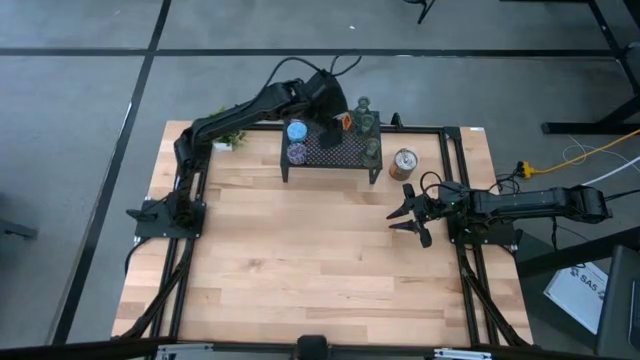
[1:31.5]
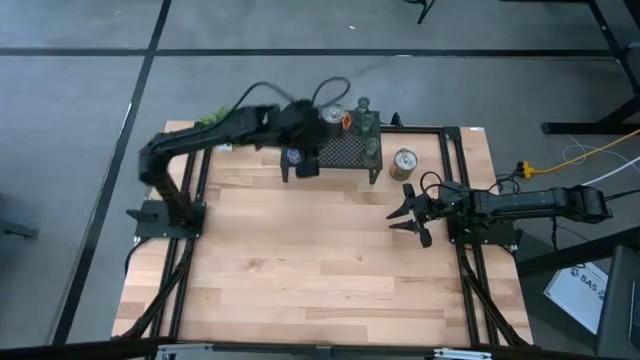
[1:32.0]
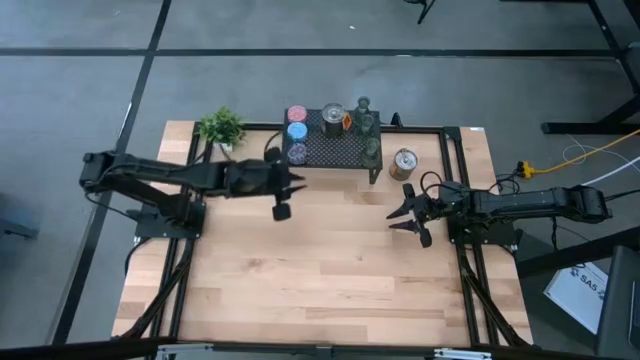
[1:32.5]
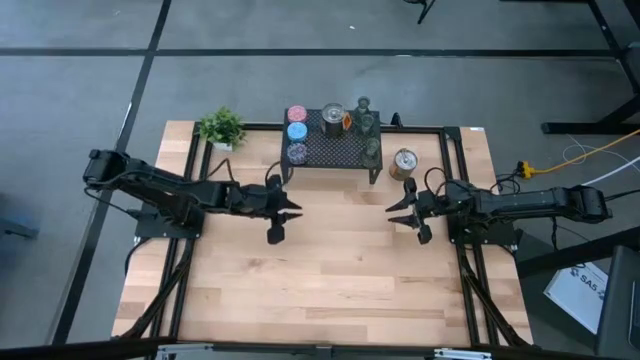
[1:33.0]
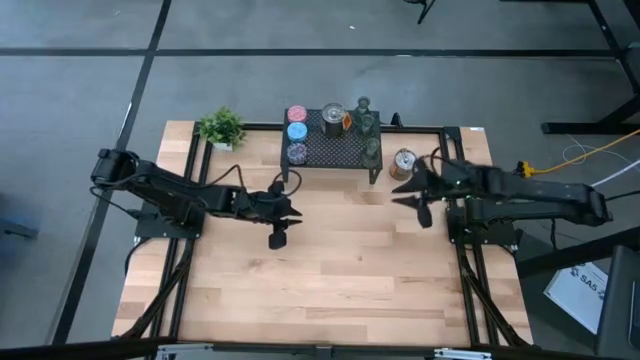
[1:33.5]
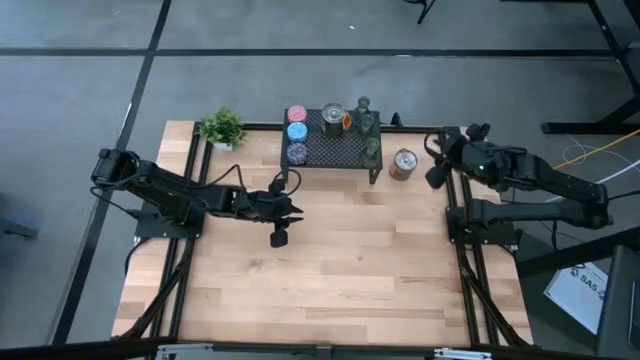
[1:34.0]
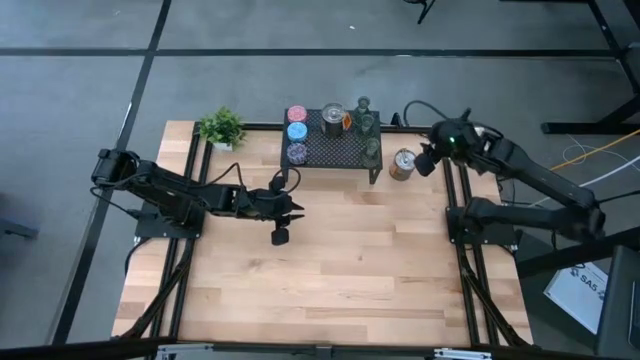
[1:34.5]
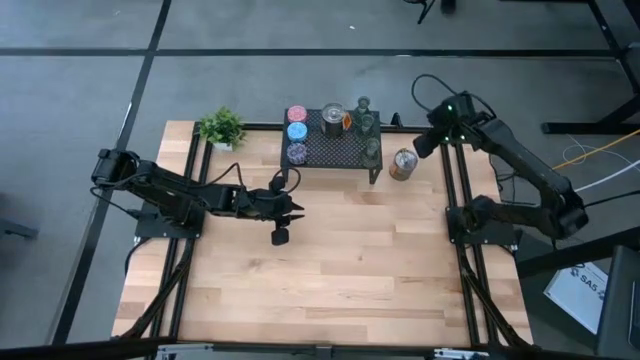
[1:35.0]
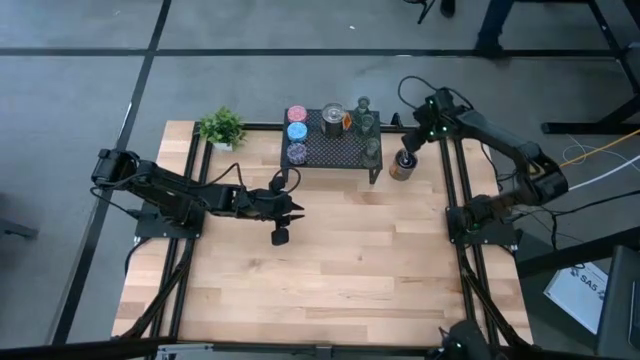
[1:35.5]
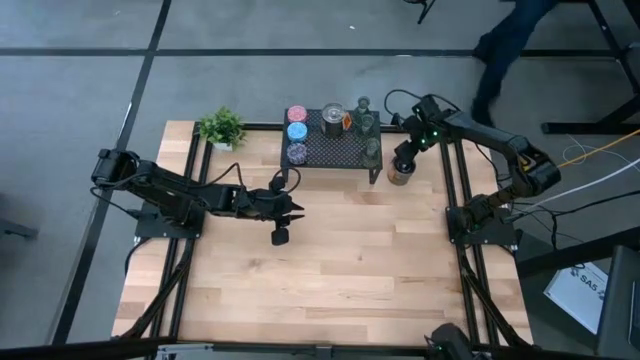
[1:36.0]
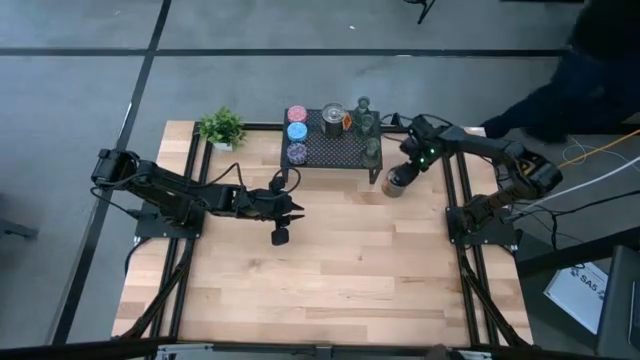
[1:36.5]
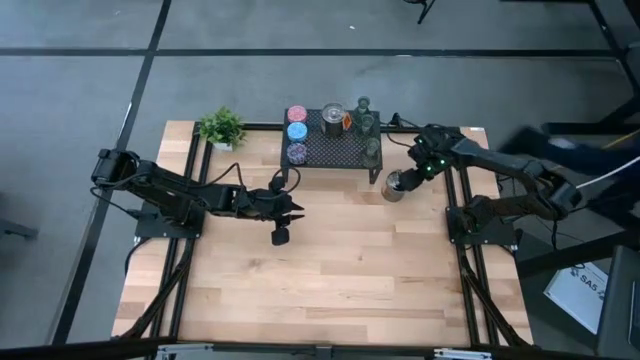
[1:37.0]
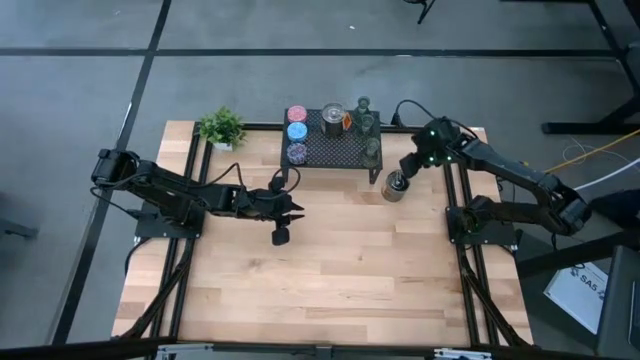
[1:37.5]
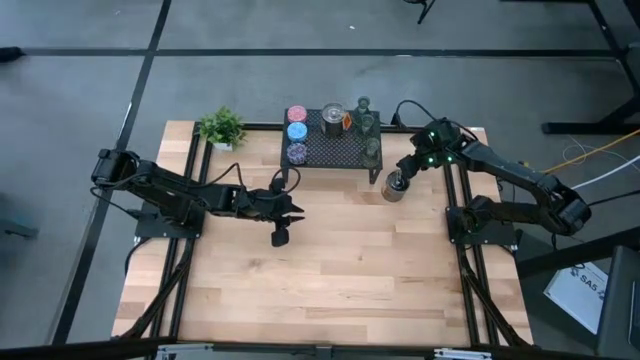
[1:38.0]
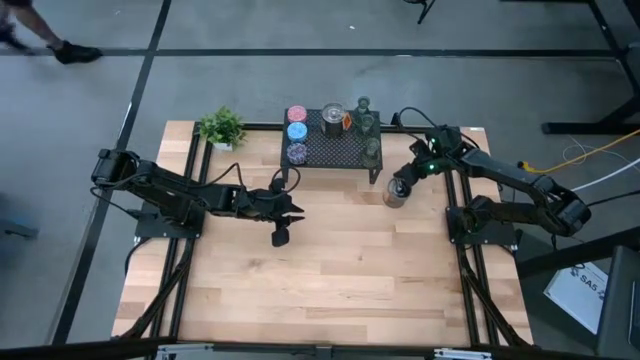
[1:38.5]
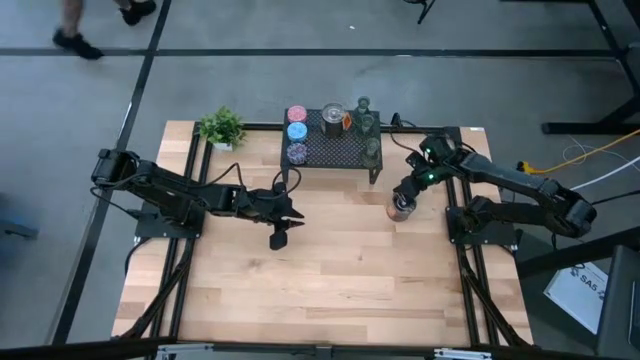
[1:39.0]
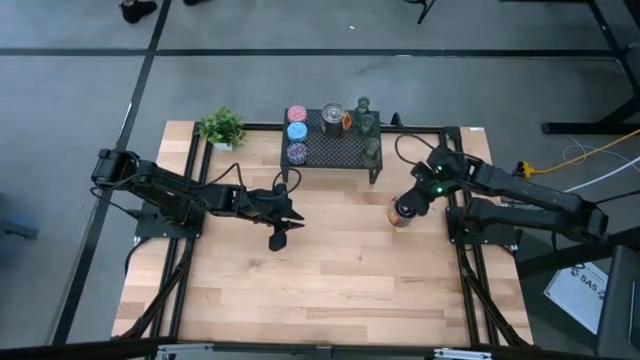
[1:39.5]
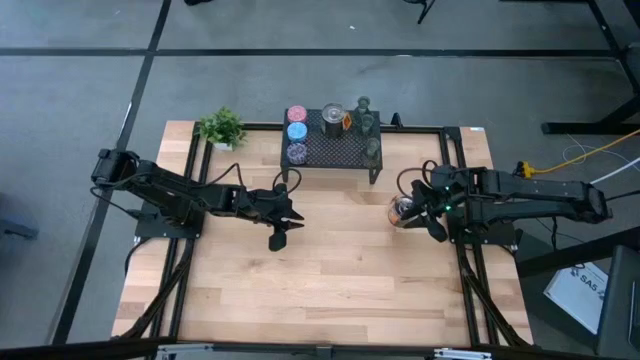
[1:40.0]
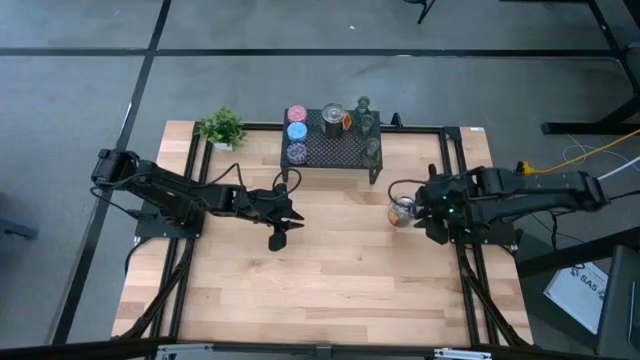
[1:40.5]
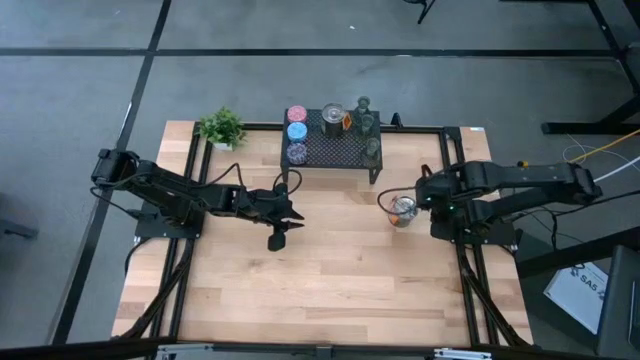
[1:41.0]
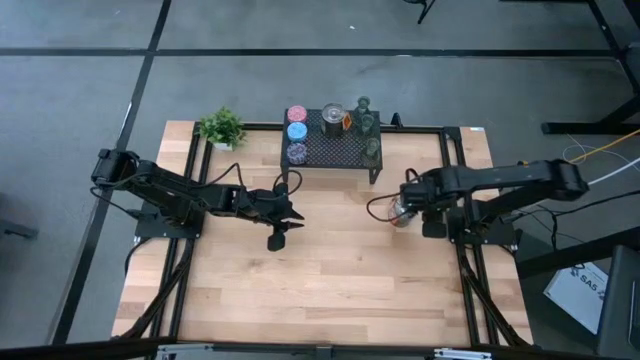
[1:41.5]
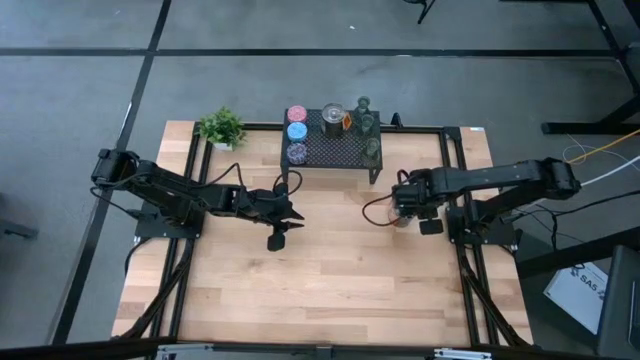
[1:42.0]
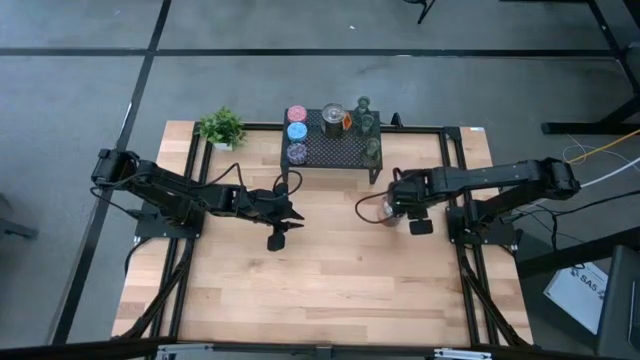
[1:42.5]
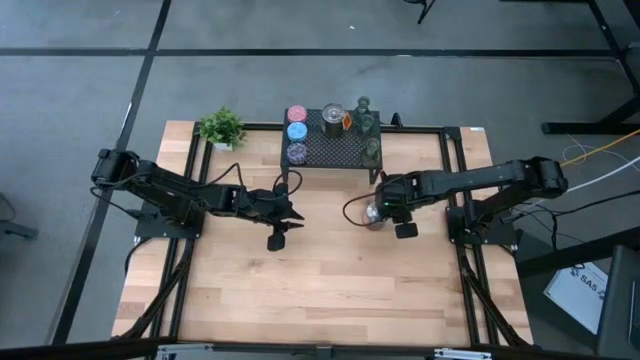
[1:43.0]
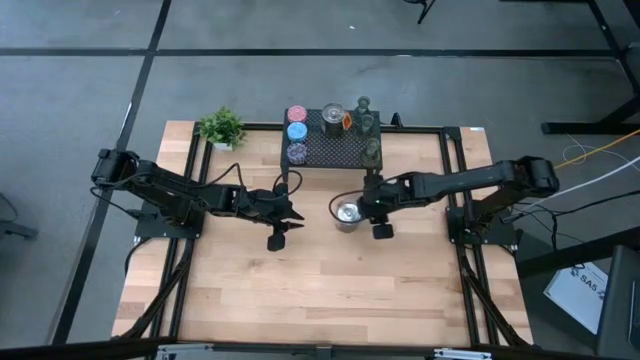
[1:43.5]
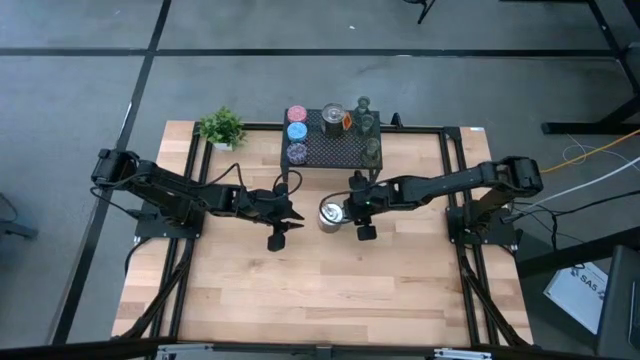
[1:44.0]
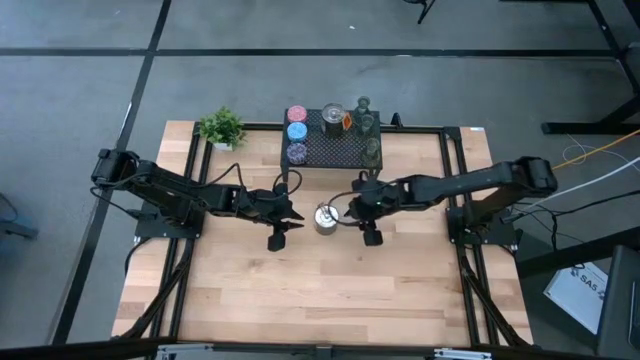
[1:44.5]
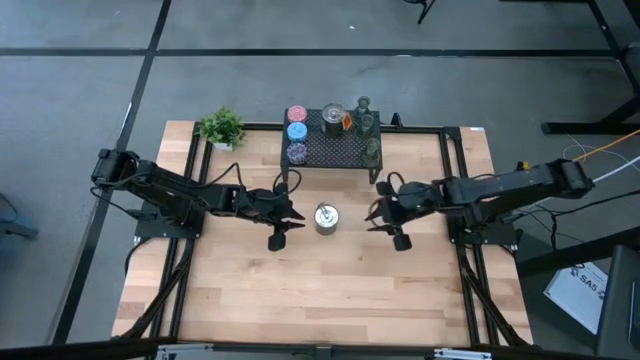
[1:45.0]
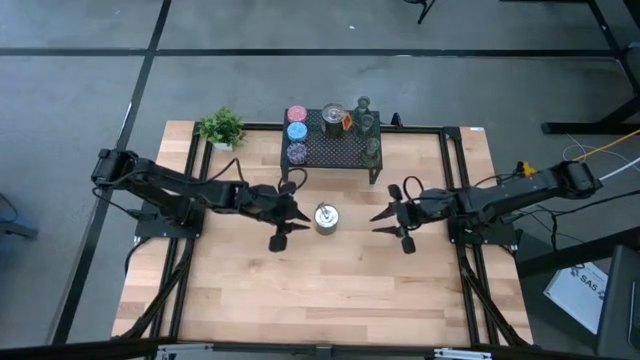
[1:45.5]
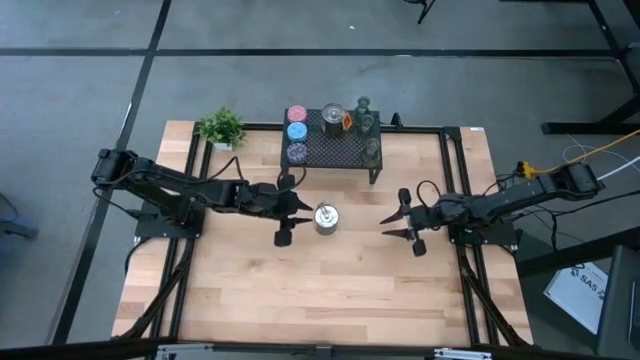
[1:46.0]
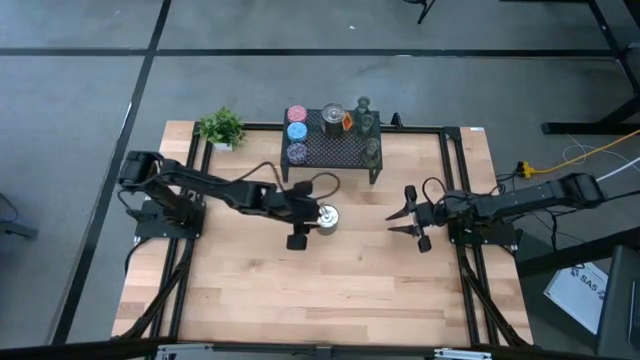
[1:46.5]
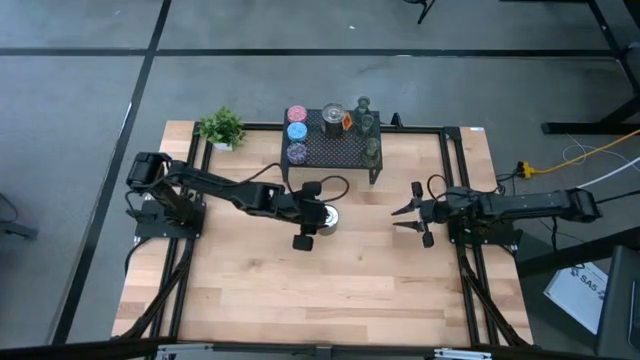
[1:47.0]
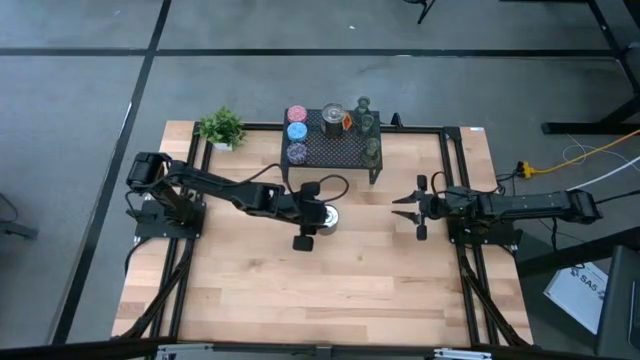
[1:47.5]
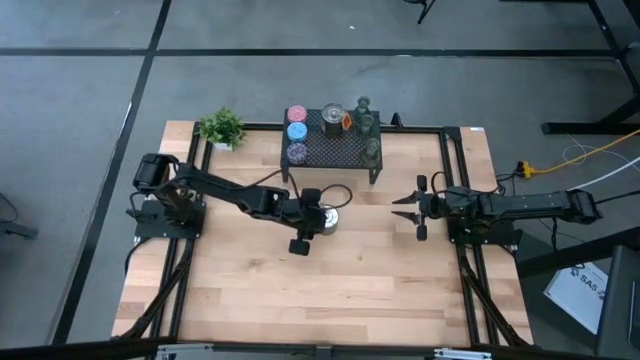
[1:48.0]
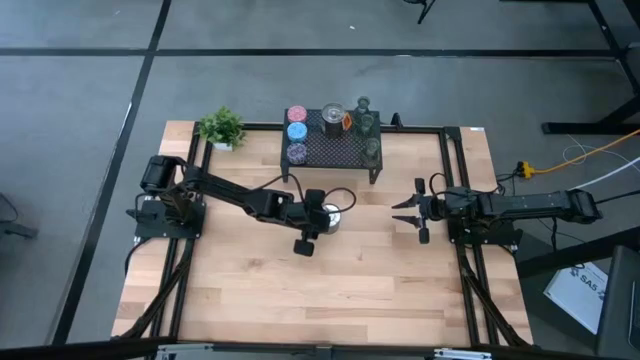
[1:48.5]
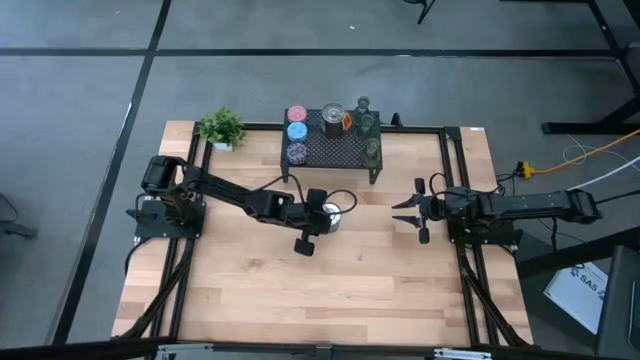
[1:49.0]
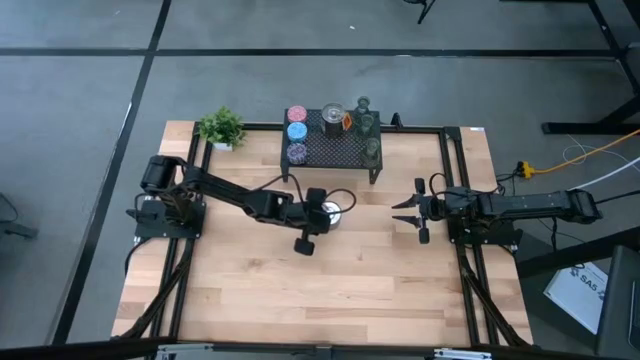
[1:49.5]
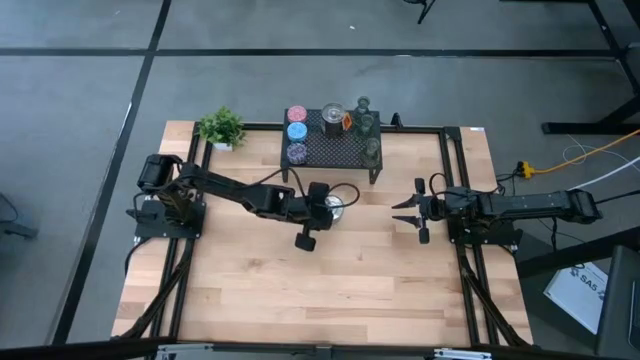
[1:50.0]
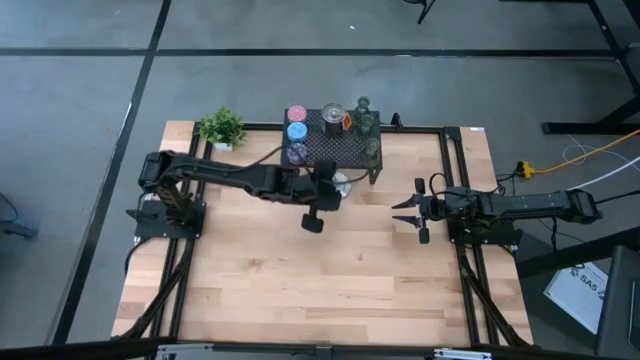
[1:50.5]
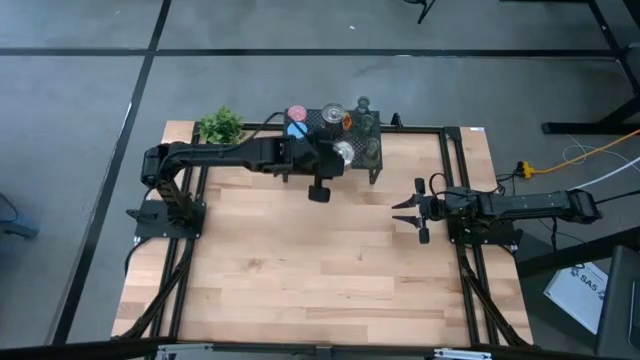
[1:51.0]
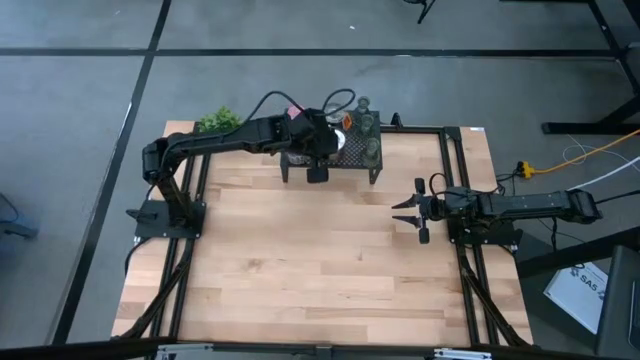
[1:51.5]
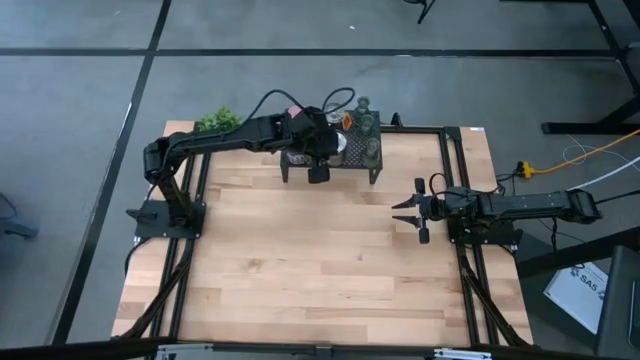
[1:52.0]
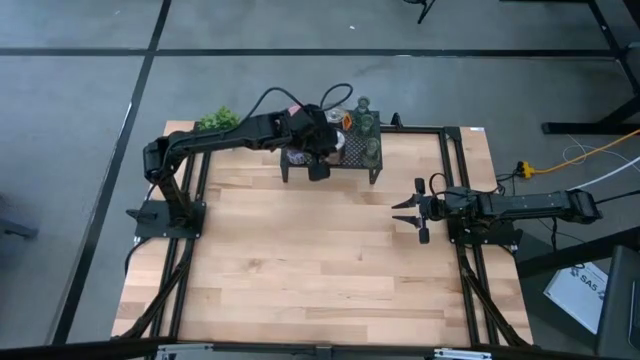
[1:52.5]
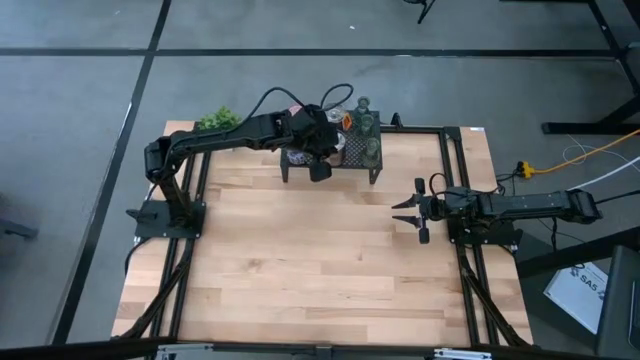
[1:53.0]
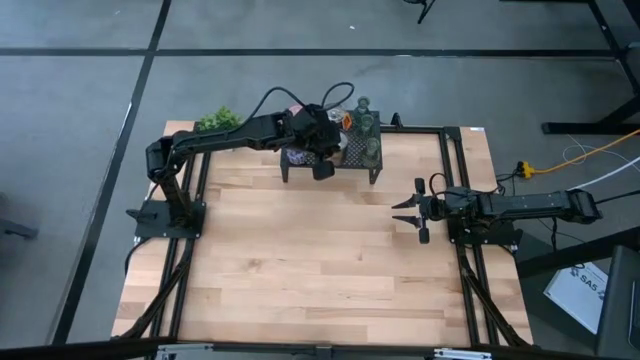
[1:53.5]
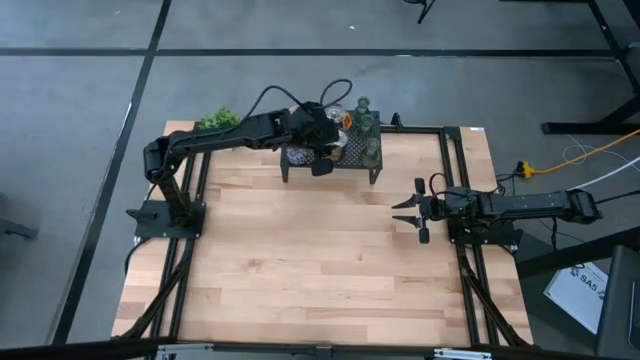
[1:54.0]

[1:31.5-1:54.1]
Task: Pick & Place candle stick holders
Put the silver scented candle on the shelf aligned with the other silver scented candle
